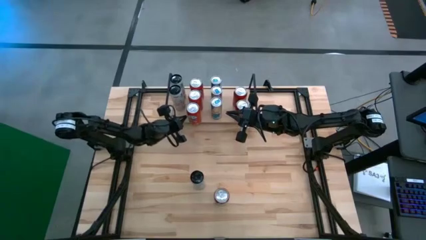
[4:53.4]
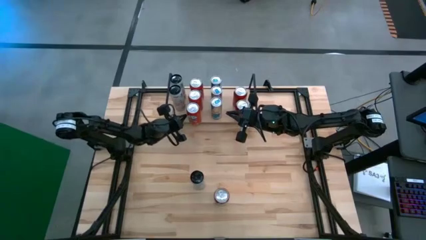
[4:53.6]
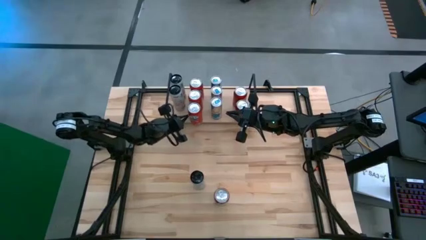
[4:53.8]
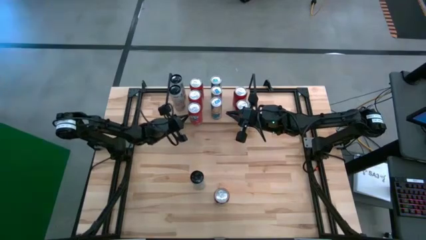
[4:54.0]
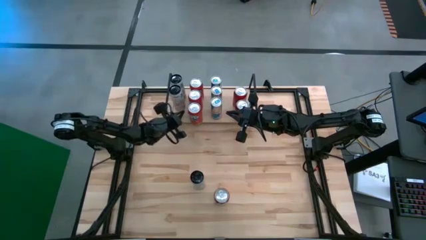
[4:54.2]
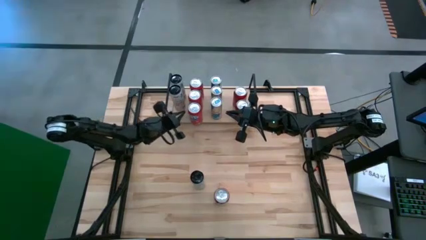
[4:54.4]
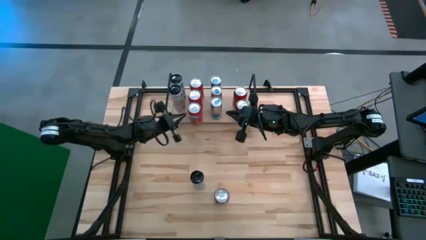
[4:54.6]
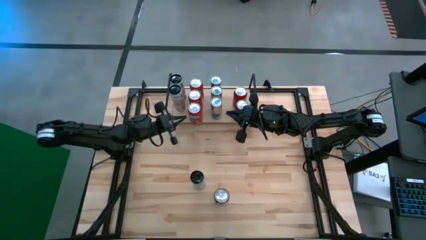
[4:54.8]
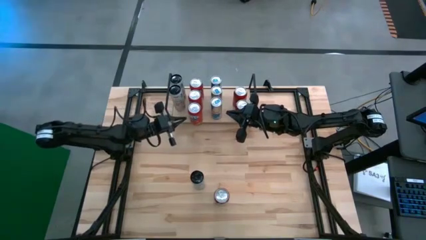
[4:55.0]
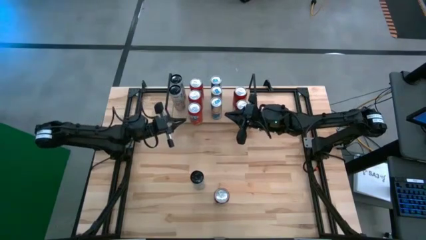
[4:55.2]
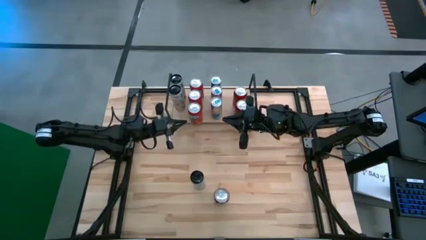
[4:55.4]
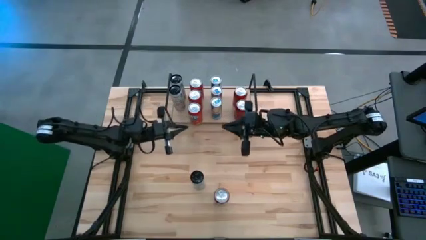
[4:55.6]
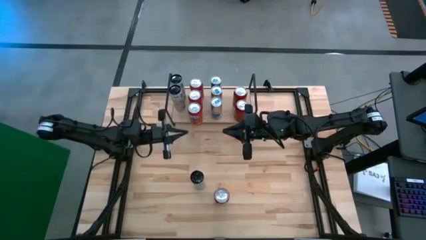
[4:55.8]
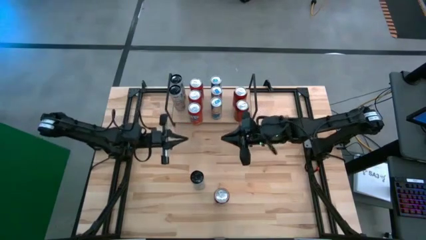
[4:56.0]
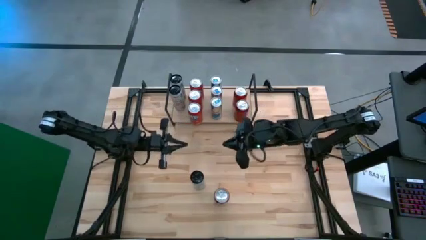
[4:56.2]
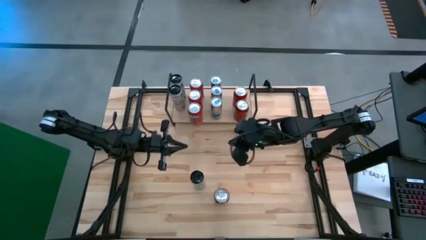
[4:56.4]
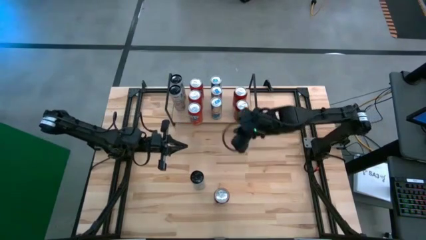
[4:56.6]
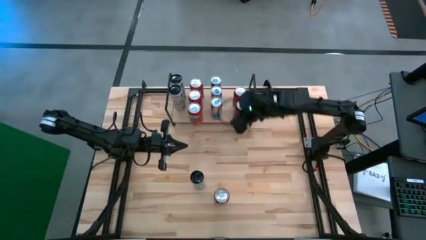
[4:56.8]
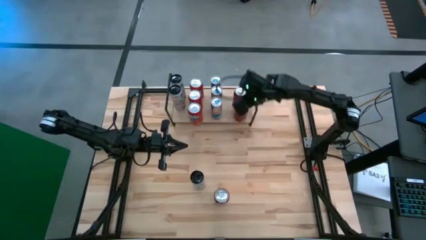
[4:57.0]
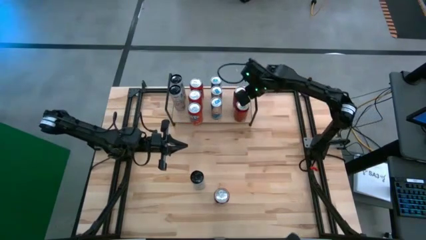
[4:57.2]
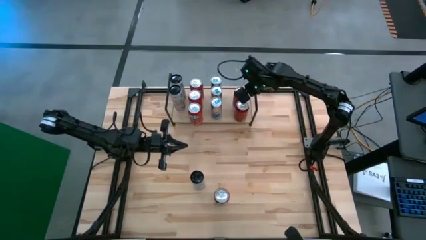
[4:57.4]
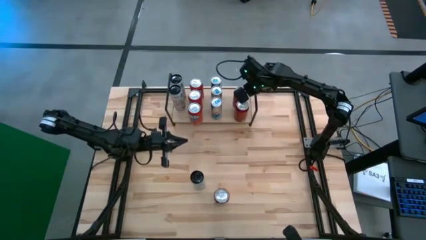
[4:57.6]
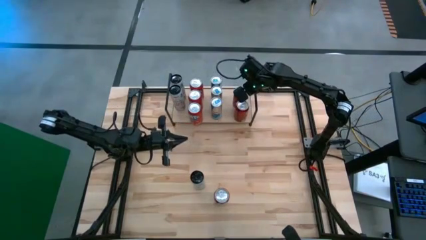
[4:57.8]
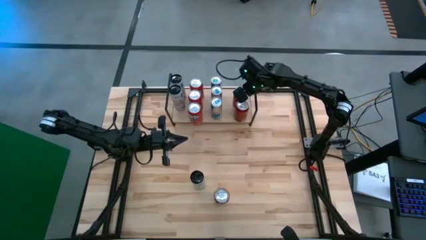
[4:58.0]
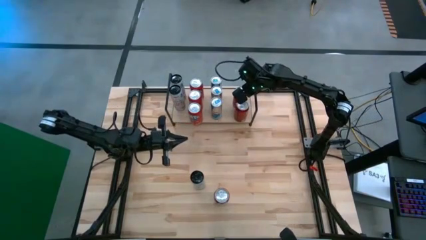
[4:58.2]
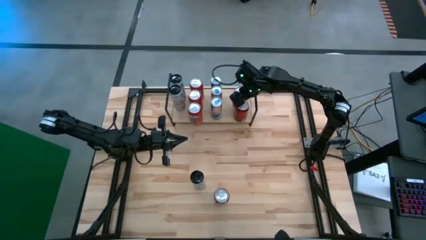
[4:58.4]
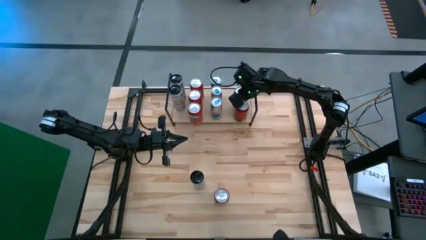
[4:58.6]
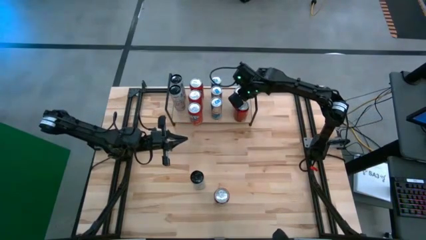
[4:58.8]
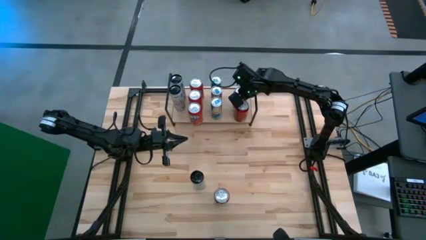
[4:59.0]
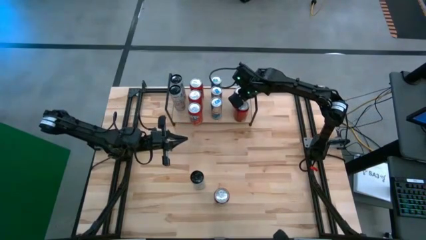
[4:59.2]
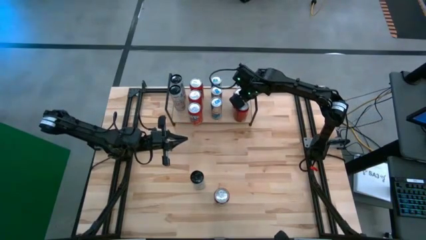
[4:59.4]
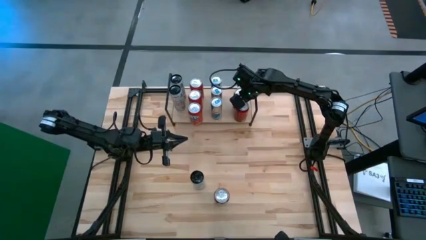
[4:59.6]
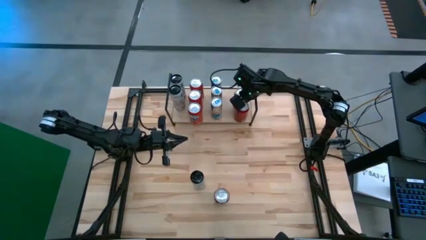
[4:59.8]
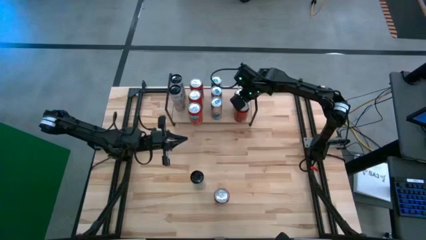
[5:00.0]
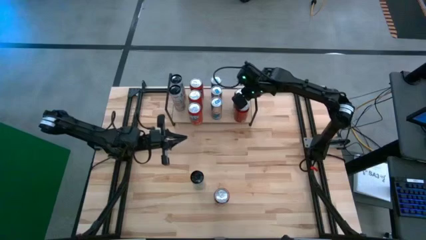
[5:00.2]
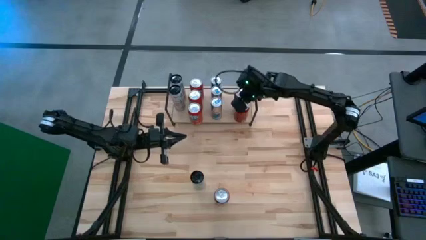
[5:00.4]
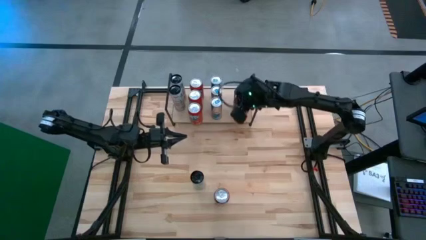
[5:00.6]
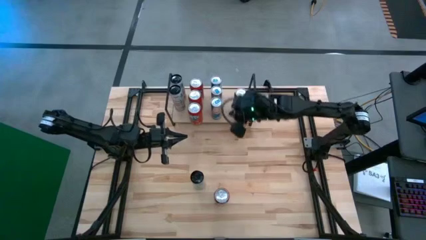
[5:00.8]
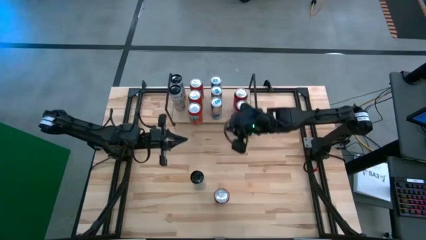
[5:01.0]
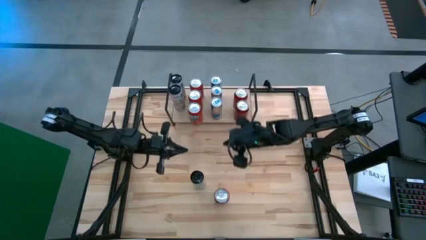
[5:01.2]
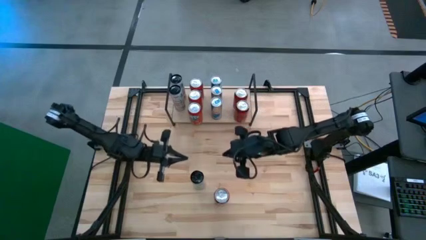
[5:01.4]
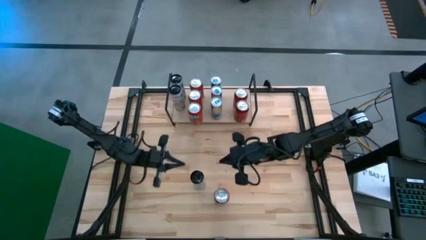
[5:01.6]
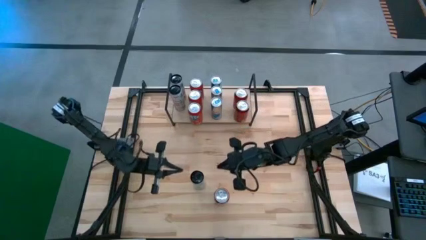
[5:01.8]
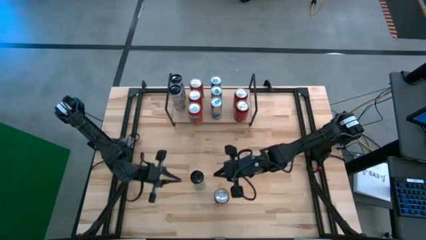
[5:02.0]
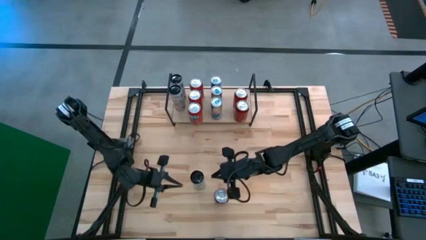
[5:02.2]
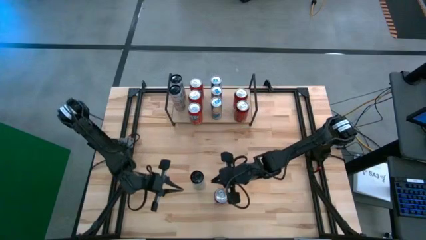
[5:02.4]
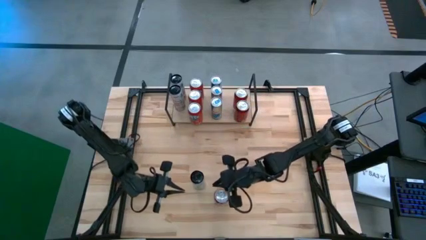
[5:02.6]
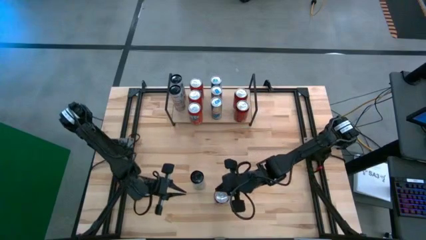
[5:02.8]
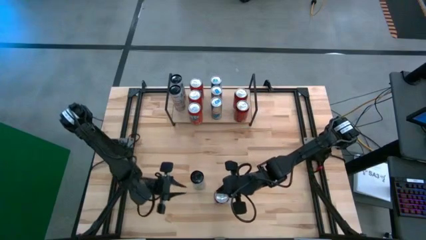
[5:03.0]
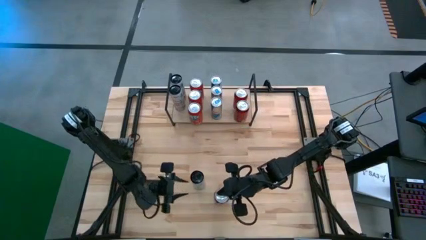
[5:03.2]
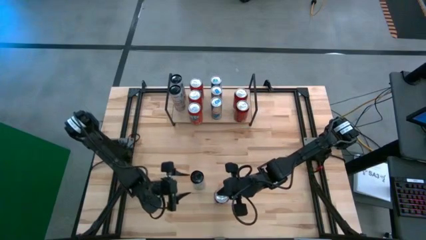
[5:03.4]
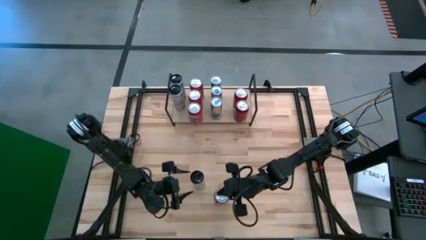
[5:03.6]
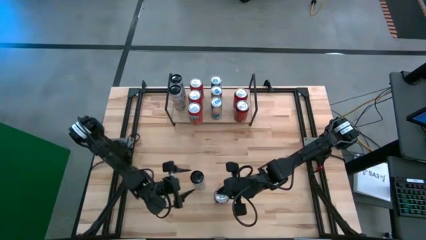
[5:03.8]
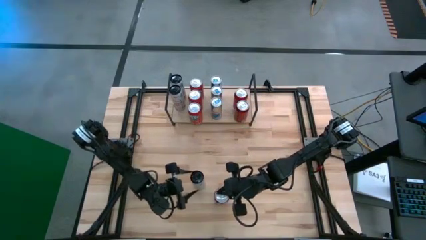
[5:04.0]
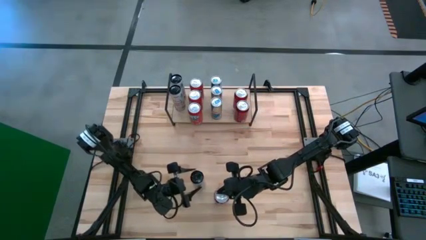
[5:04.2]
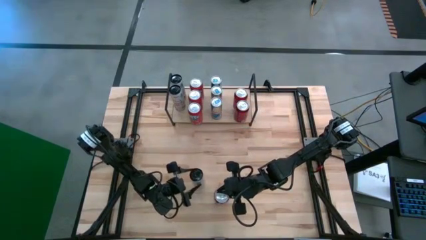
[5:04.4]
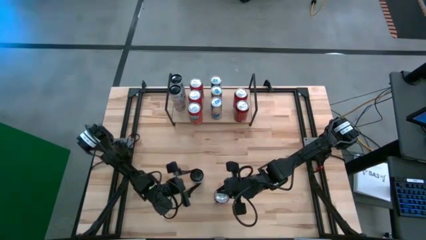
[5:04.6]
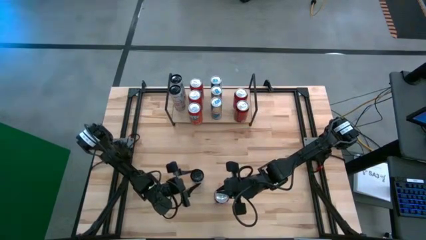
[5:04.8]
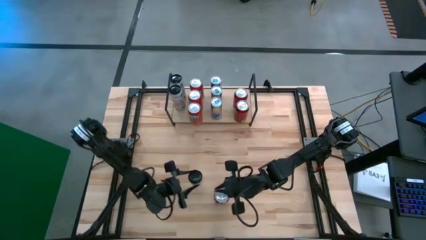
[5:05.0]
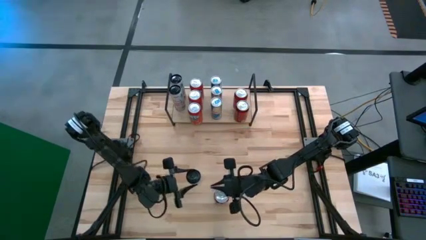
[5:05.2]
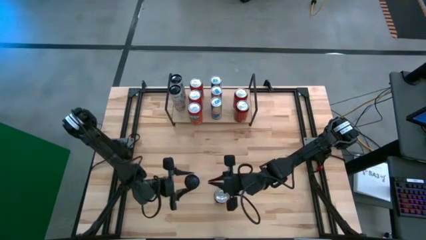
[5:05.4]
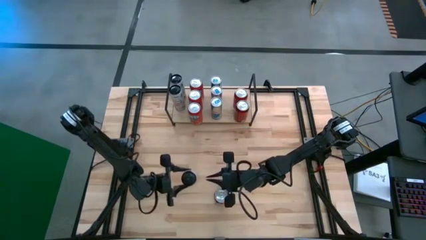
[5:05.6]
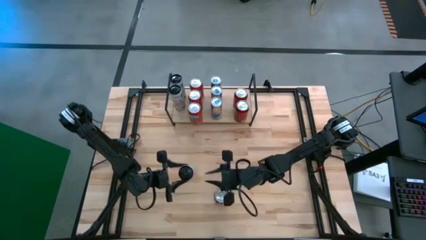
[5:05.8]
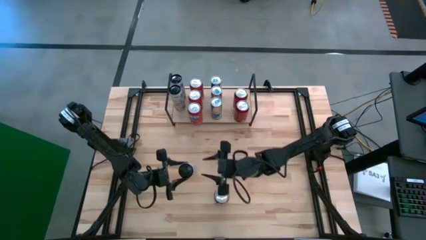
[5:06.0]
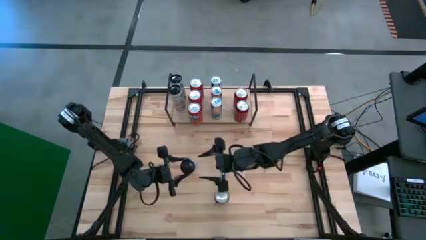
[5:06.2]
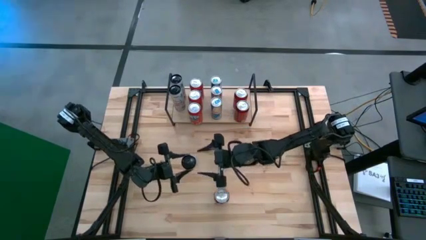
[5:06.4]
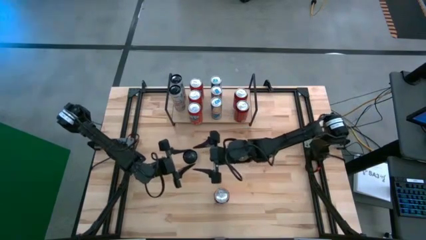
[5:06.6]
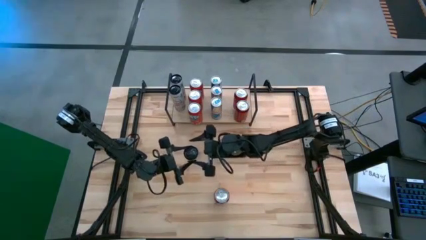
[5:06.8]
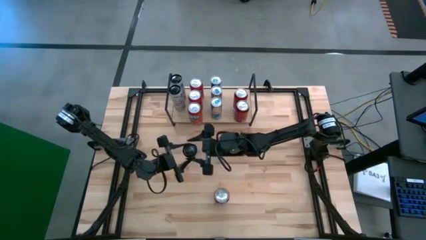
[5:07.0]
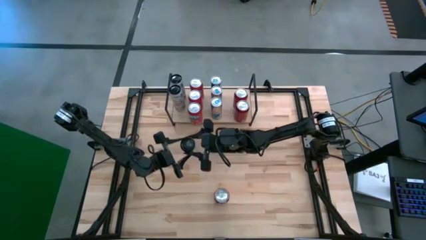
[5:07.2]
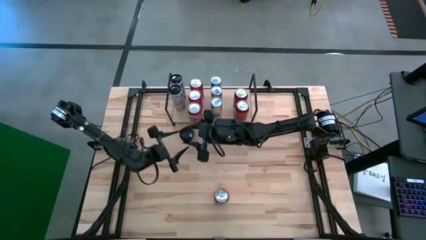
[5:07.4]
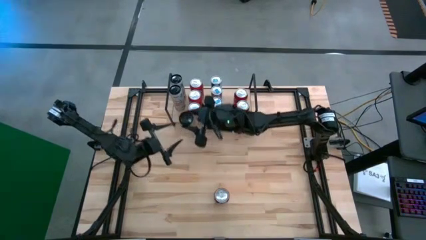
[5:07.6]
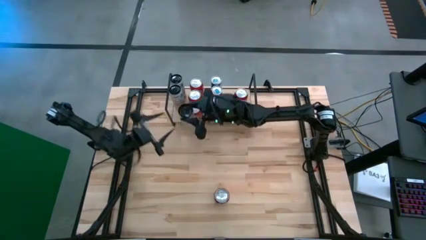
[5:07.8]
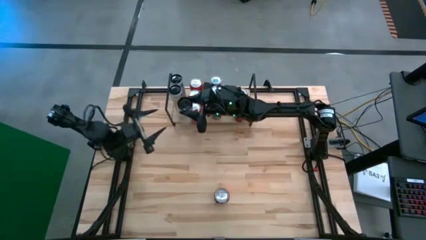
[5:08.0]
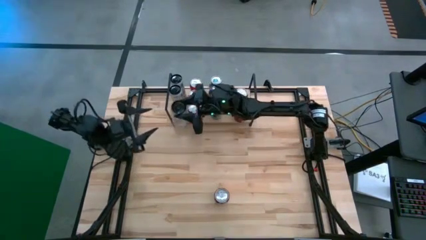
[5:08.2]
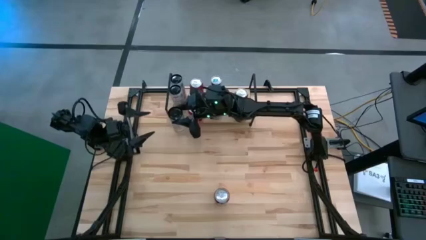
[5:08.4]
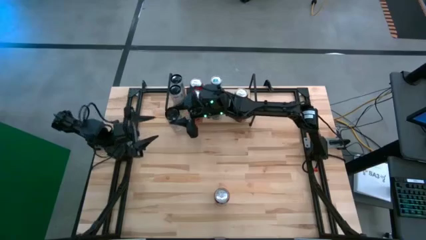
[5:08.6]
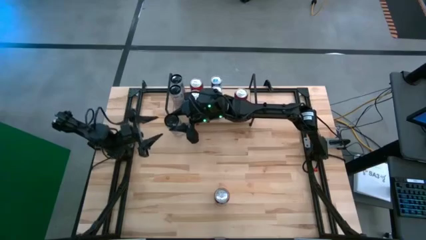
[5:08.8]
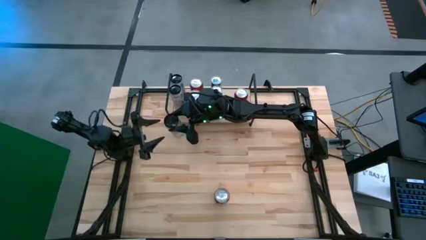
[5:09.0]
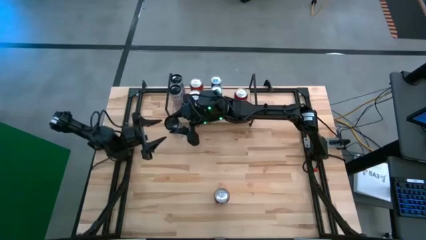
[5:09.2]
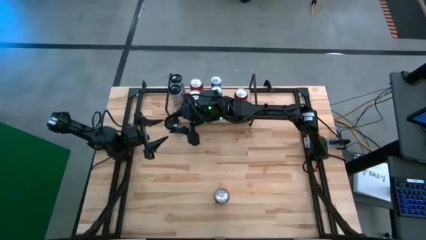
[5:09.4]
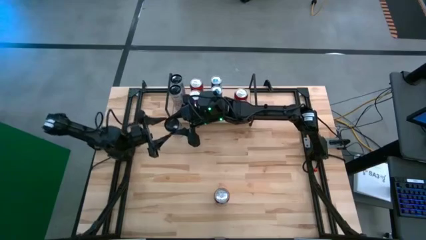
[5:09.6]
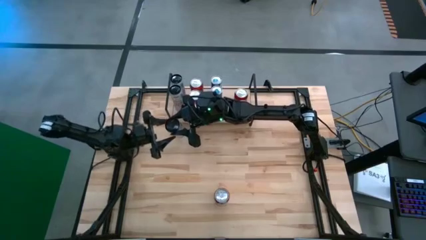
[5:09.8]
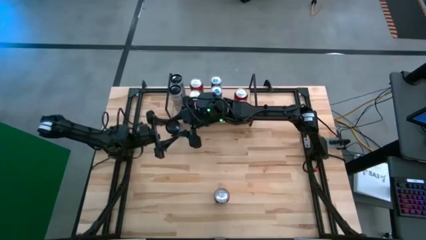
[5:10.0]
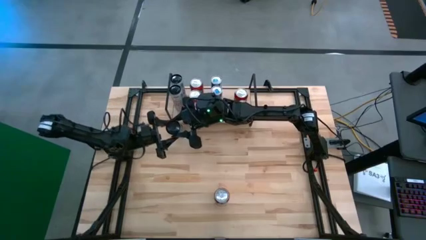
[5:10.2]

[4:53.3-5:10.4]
Task: Place canned beverage on shelf
Put the white soda can on the shelf aligned with the other white soda cans
